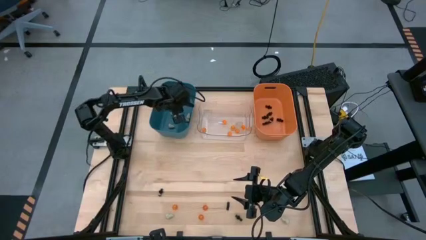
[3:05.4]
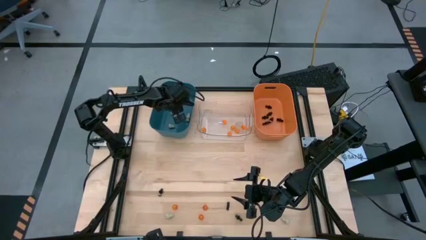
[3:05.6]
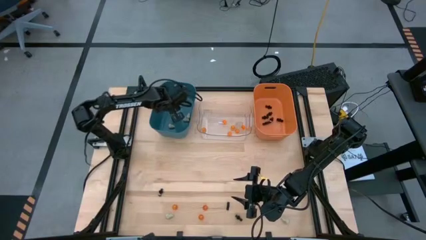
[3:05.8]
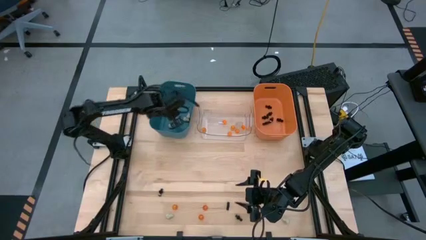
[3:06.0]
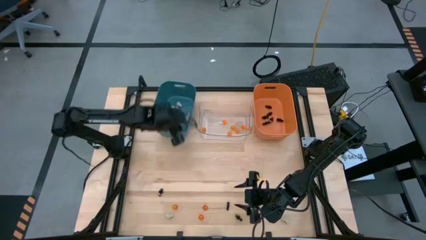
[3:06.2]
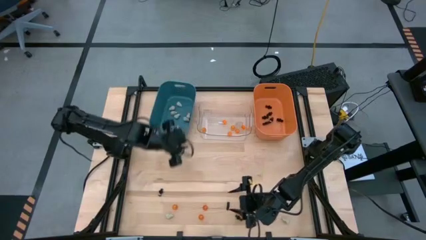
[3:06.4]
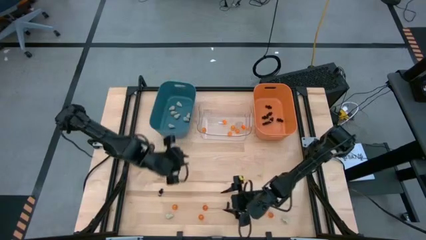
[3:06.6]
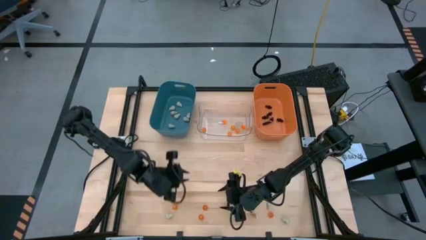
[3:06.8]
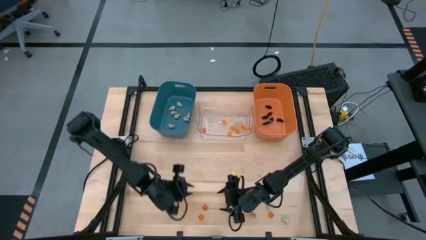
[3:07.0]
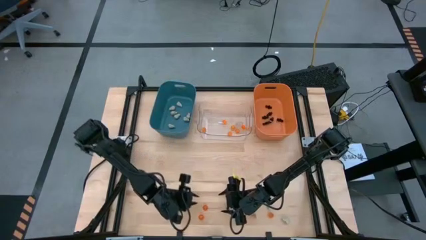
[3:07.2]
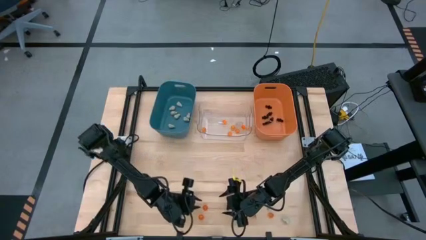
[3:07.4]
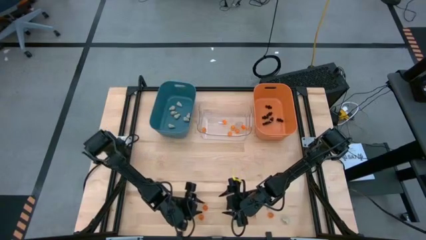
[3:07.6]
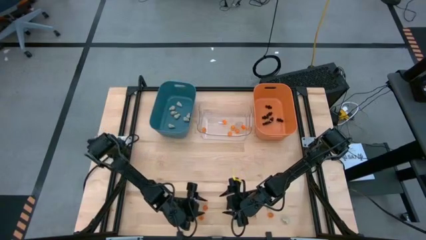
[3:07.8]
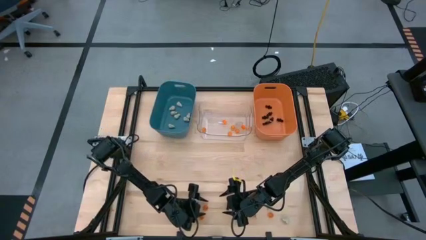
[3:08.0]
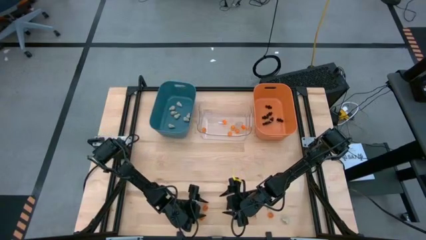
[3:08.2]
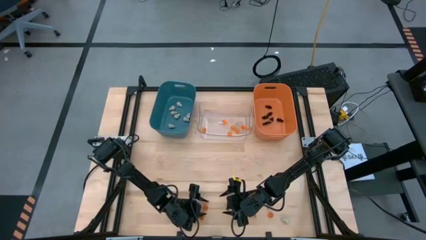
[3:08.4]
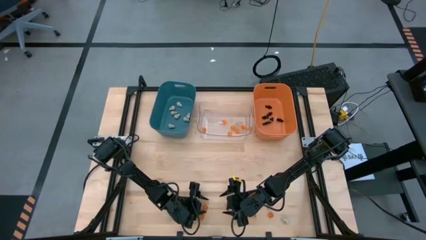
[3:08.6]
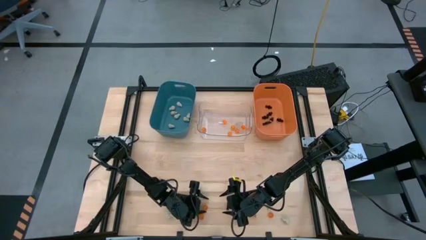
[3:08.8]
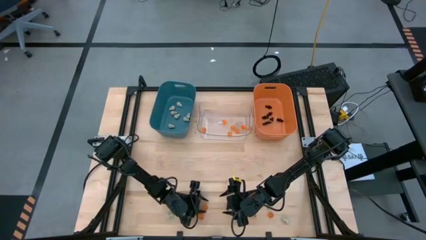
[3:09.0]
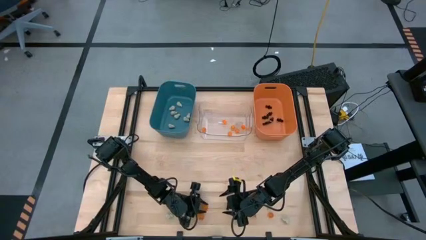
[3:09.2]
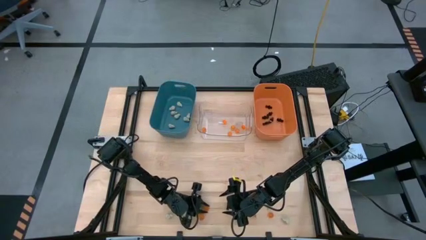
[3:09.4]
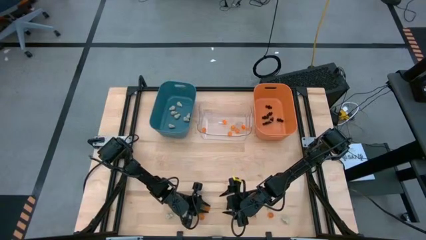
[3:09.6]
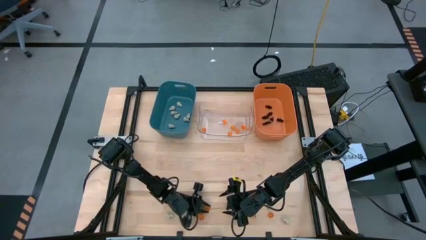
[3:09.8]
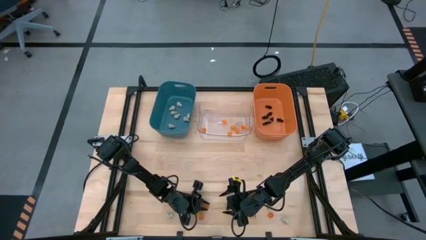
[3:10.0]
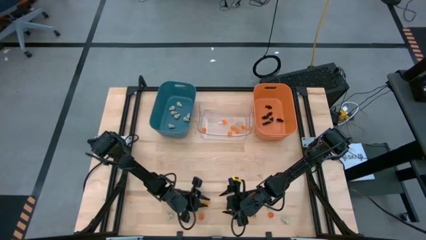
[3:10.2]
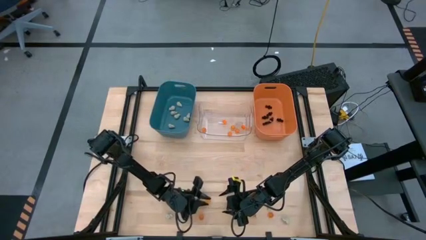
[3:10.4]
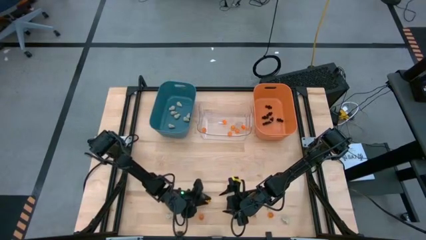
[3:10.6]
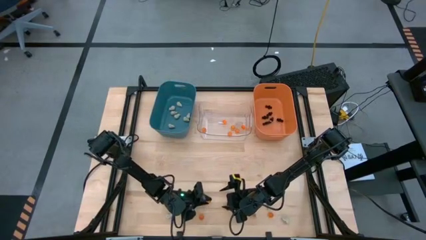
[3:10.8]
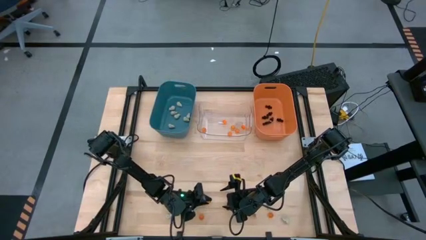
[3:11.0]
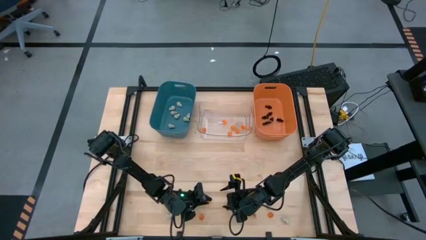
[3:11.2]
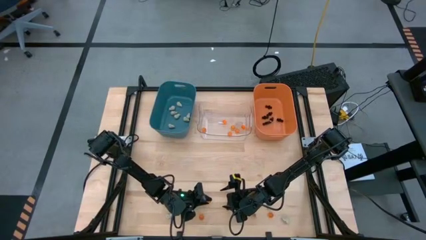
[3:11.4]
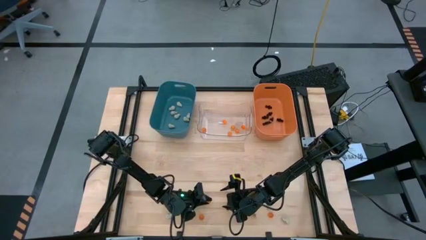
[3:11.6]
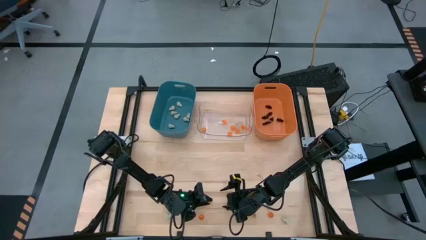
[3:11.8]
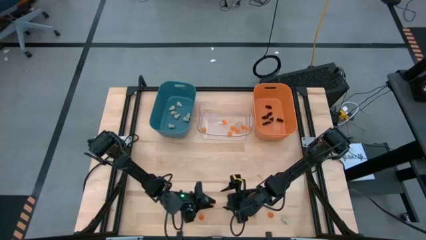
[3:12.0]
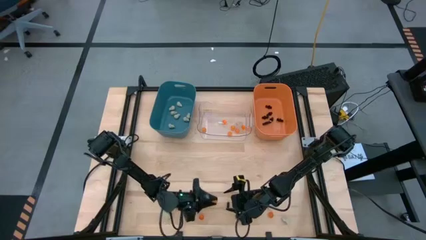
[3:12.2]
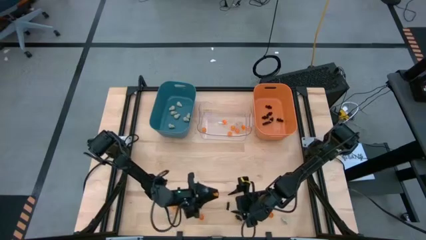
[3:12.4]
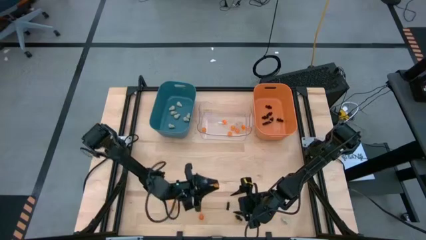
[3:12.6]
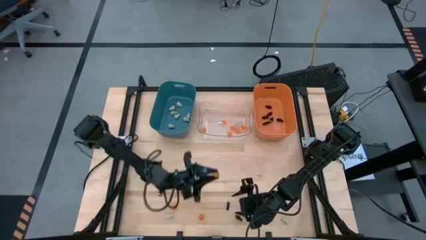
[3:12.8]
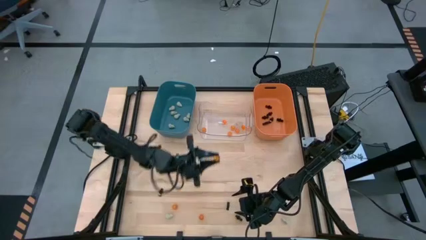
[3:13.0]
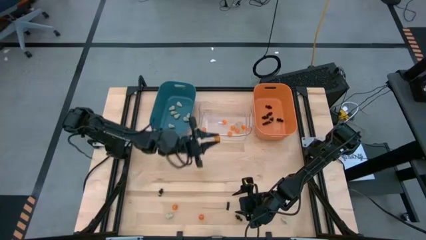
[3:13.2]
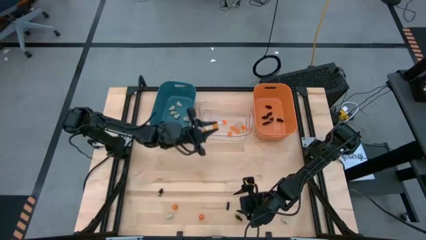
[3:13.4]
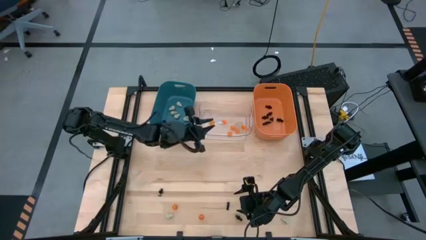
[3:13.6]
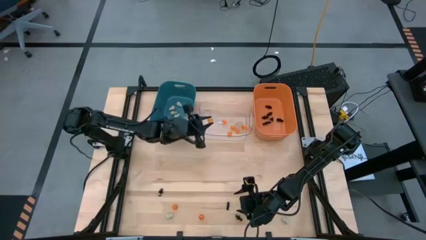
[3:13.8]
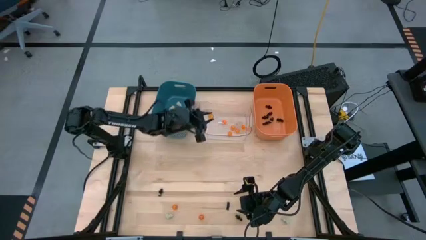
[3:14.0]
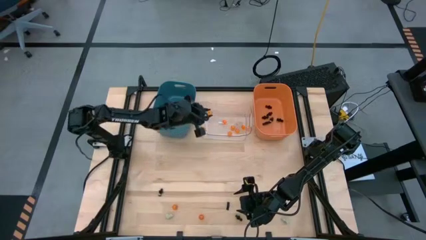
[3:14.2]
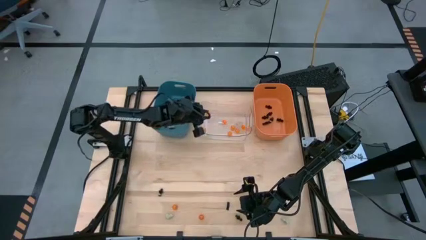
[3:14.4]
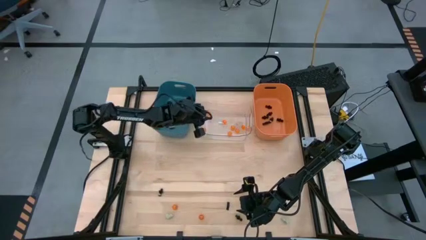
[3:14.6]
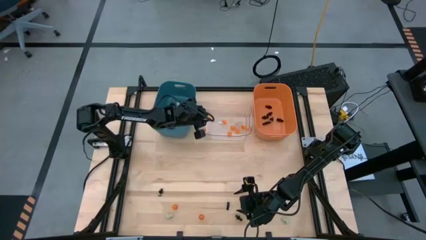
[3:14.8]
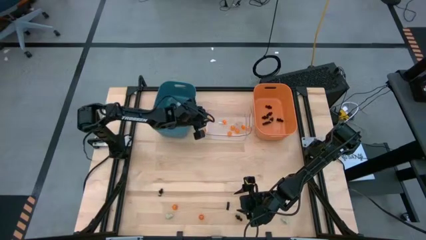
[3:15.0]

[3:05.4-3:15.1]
Task: Sort Halloween decoration
Put the orange pumpkin toy into the transparent bin

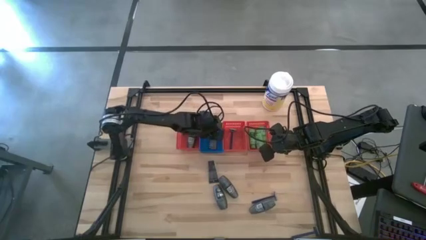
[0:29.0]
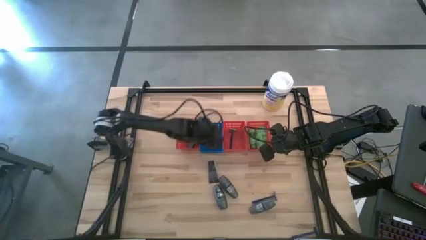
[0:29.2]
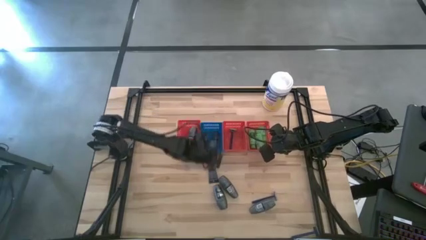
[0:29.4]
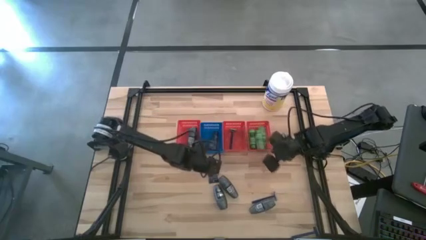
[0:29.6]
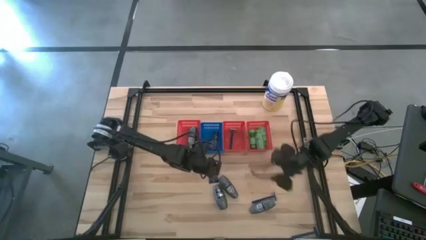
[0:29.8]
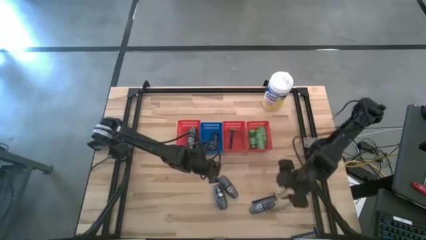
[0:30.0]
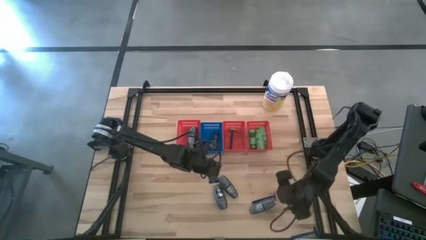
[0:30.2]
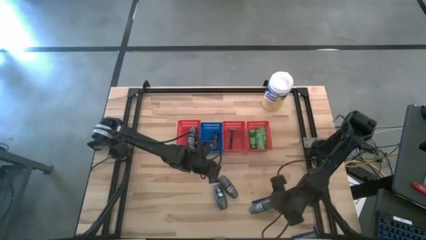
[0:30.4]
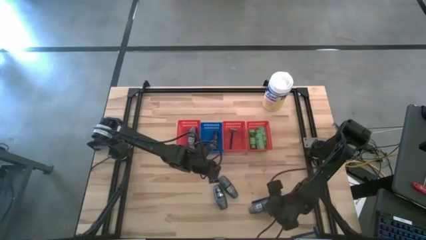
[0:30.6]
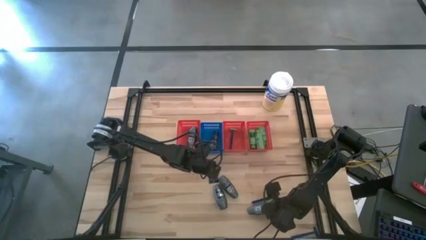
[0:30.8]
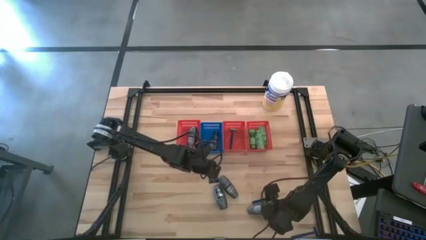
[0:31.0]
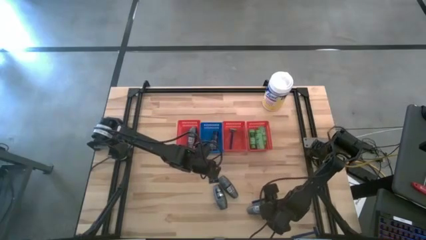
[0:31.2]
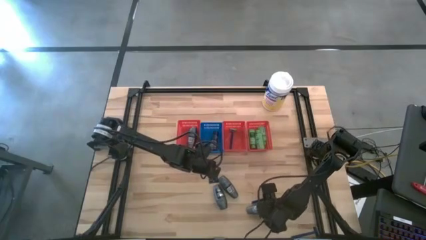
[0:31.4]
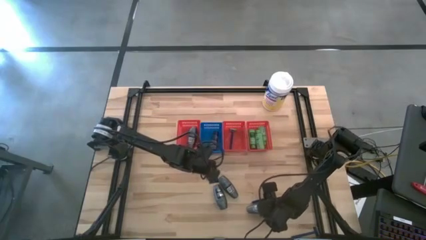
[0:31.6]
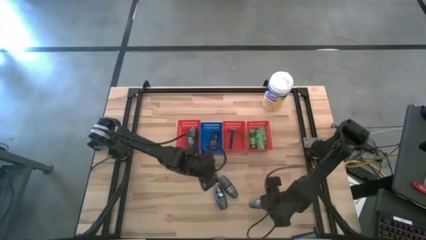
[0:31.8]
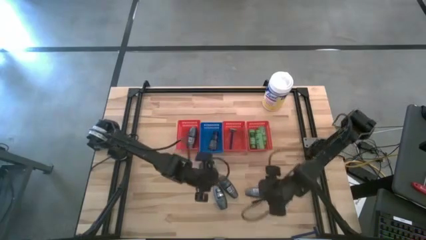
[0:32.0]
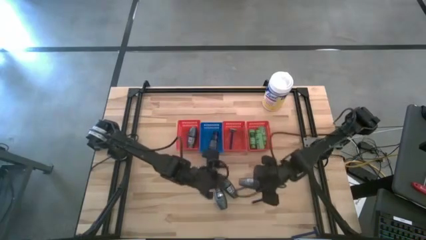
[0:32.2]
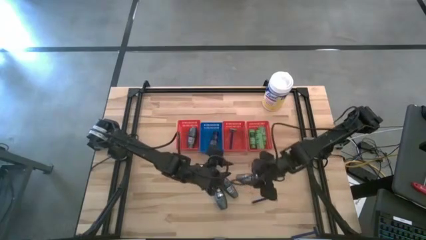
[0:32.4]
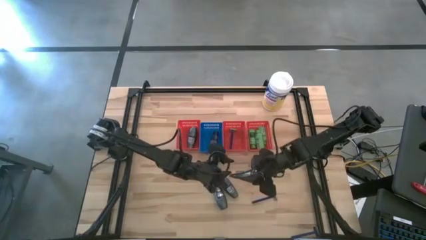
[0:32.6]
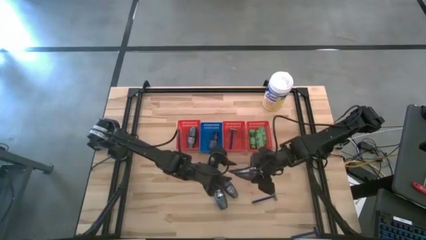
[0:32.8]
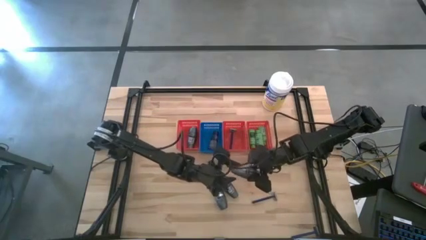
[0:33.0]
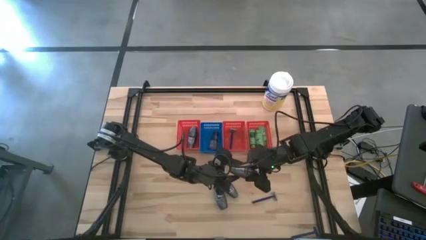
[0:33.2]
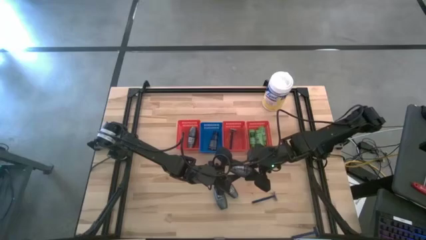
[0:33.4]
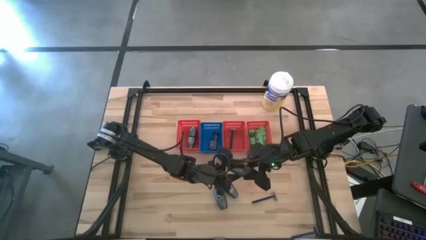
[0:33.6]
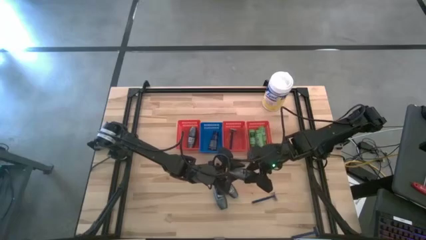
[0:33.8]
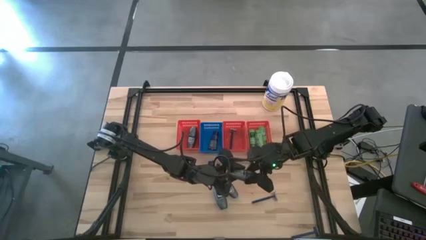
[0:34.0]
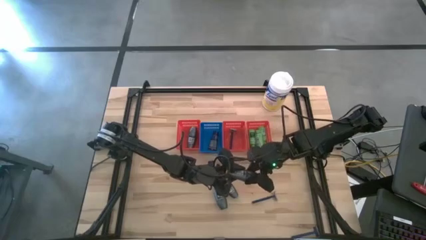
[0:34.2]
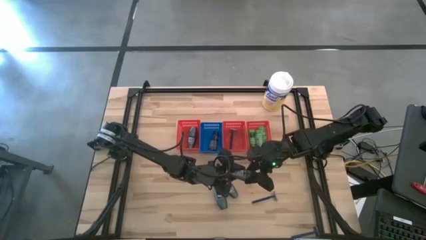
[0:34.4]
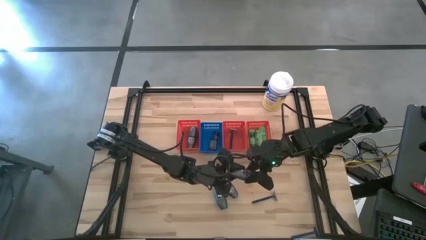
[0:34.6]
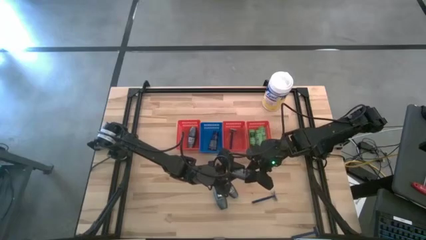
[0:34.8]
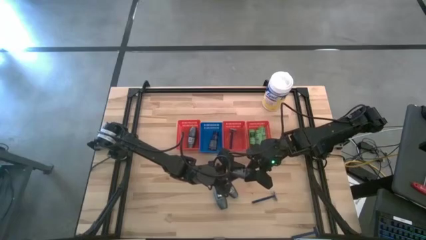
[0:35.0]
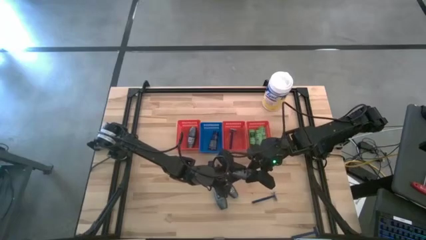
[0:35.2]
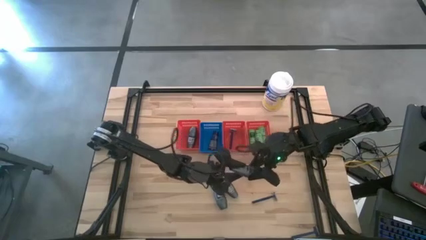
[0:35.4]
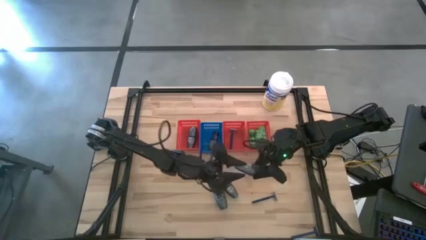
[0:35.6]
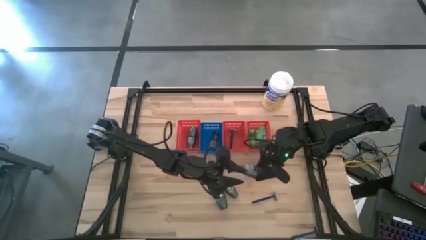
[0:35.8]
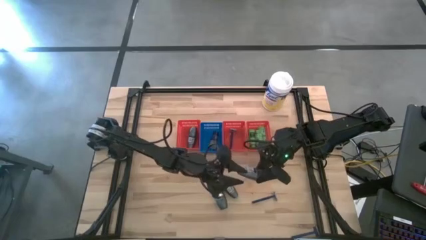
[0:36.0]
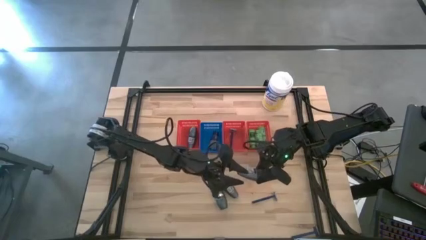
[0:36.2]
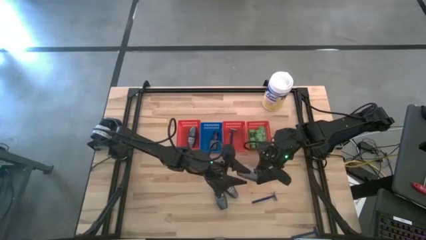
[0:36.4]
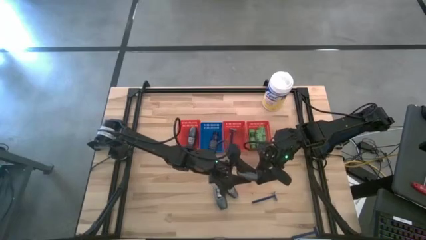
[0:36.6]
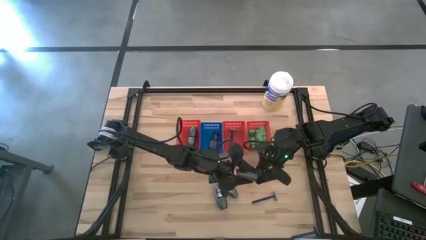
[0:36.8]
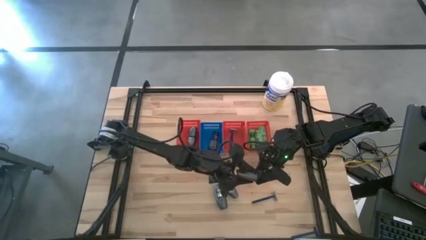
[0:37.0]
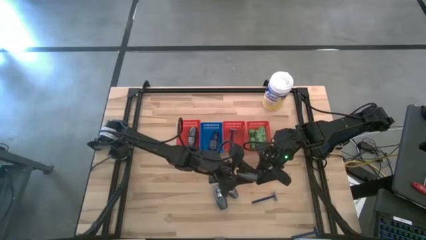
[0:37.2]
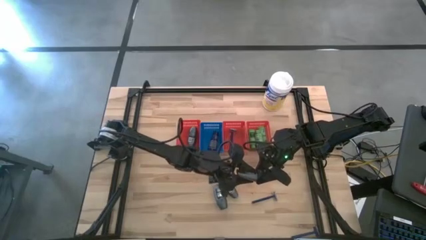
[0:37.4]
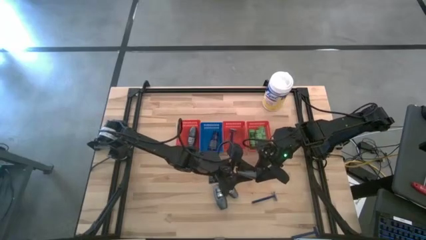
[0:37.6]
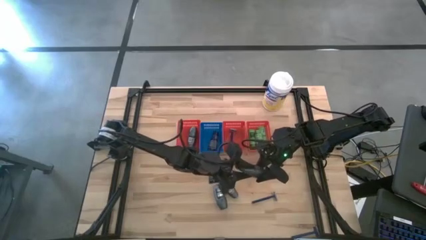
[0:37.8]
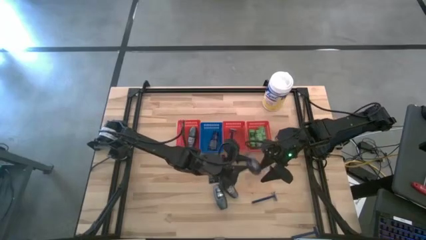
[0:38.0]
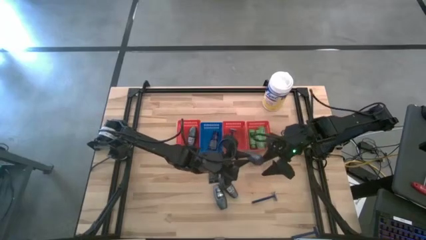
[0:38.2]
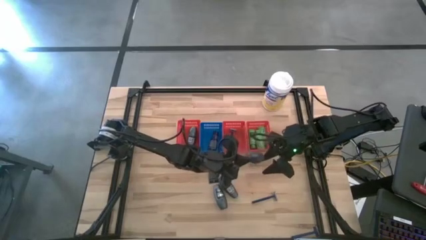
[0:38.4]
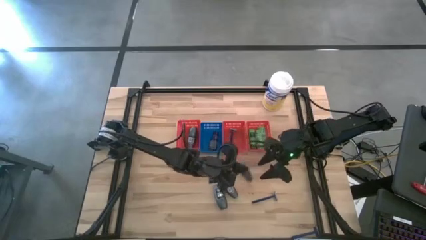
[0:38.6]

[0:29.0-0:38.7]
Task: Pick & Place Travel size toiletries
Put the black deodorant into the left red basket
